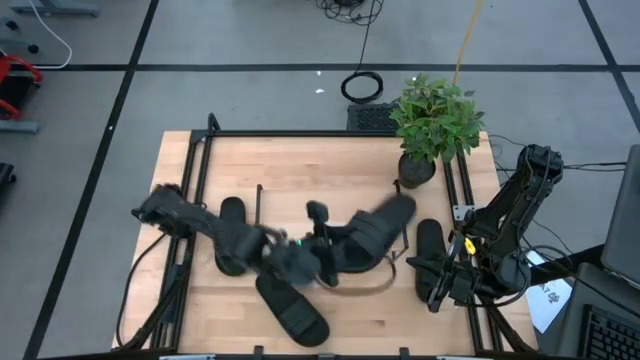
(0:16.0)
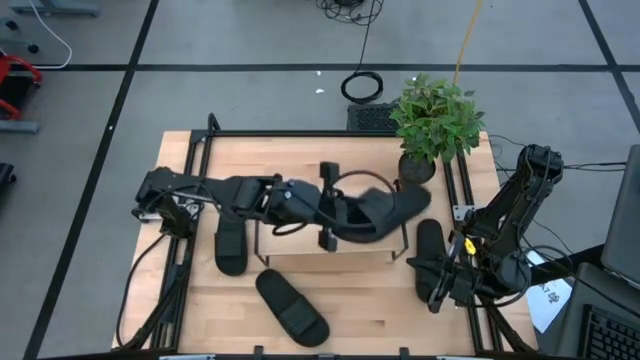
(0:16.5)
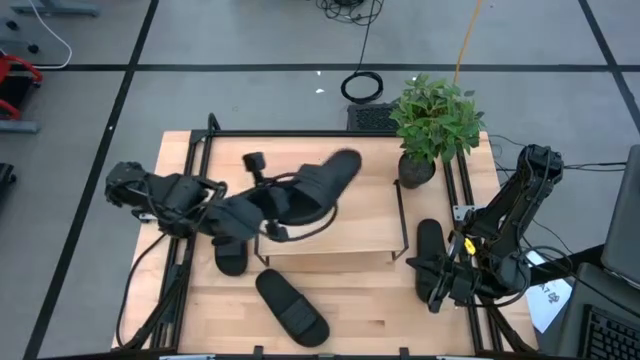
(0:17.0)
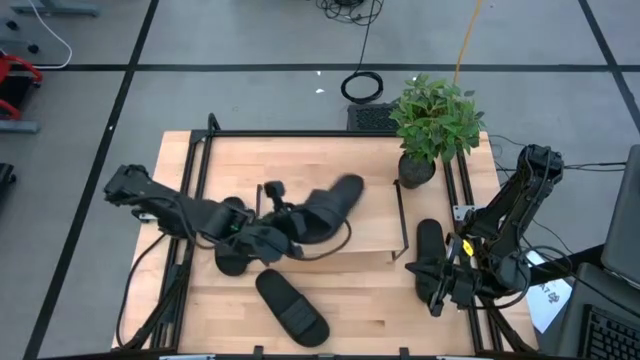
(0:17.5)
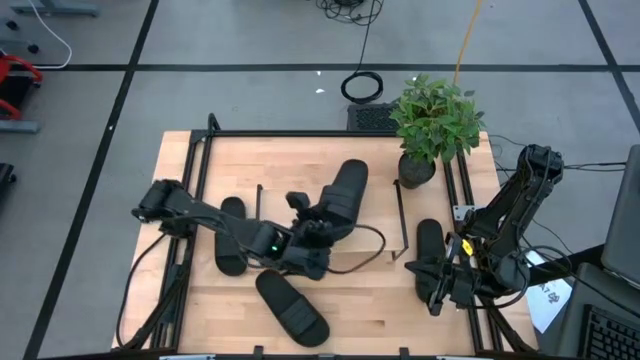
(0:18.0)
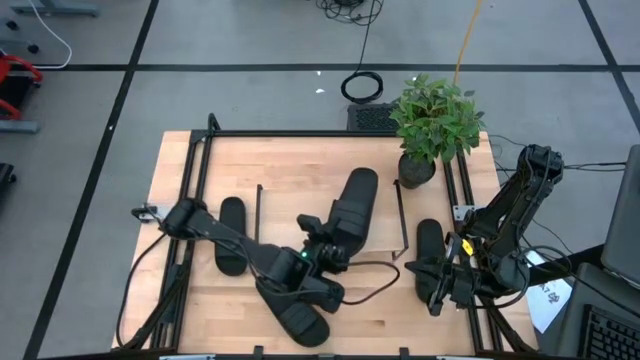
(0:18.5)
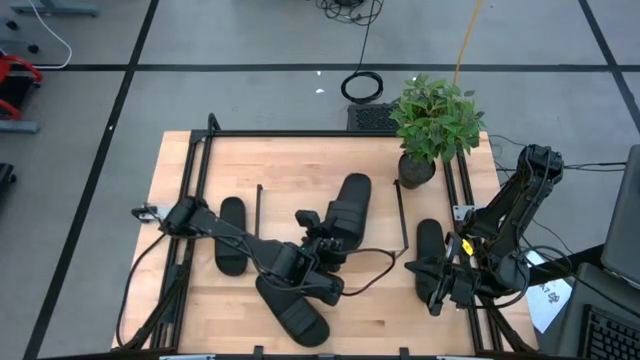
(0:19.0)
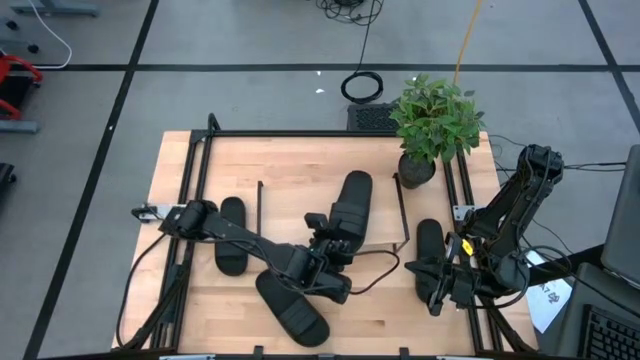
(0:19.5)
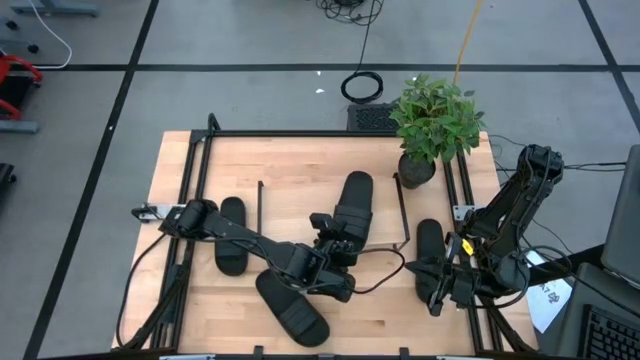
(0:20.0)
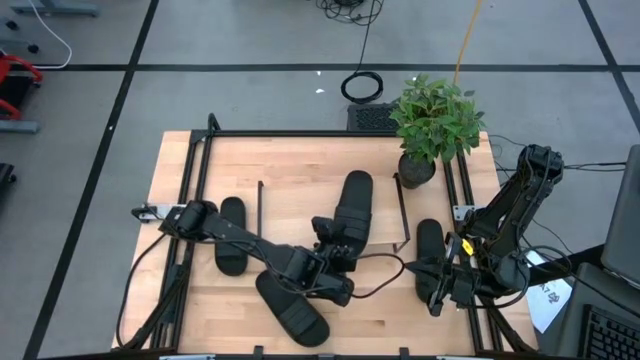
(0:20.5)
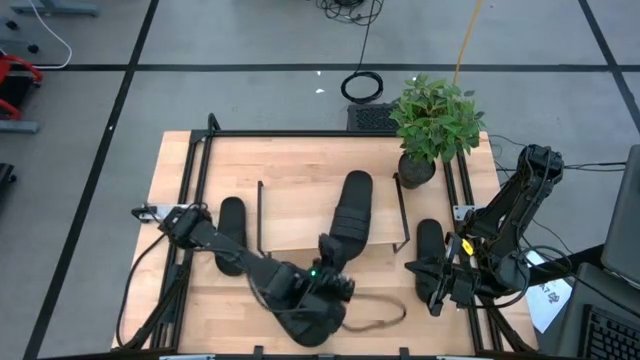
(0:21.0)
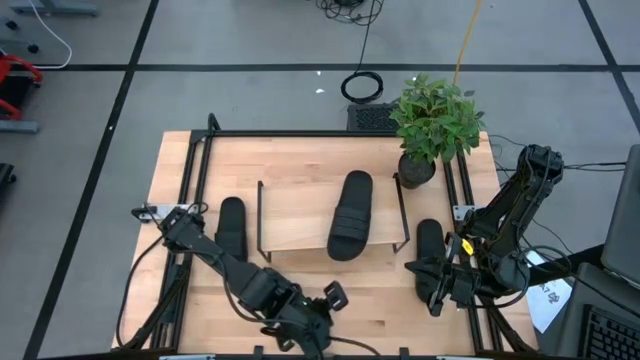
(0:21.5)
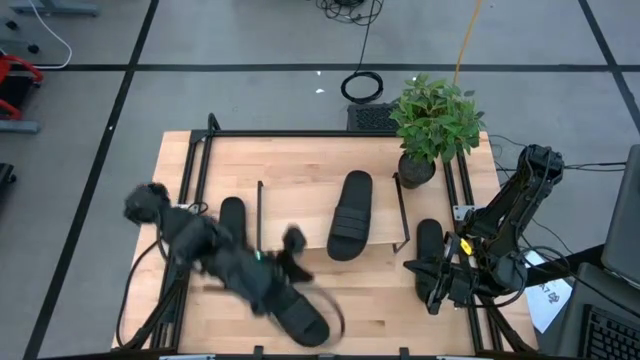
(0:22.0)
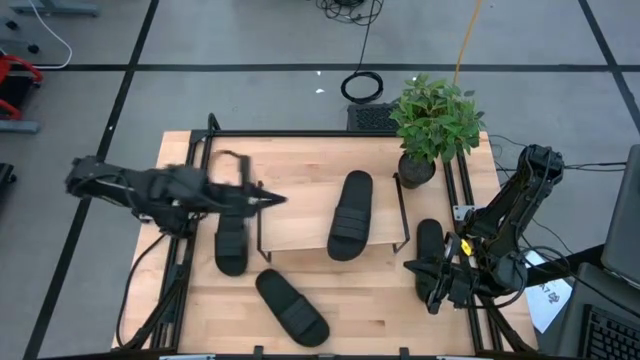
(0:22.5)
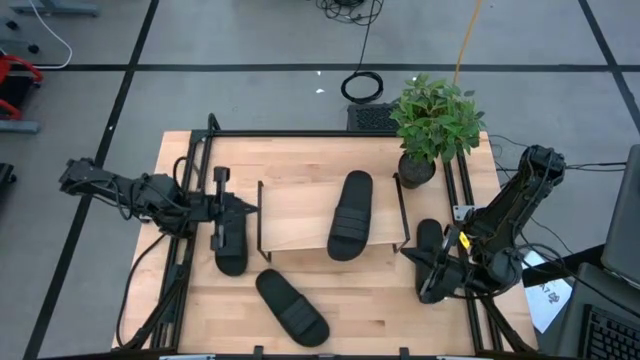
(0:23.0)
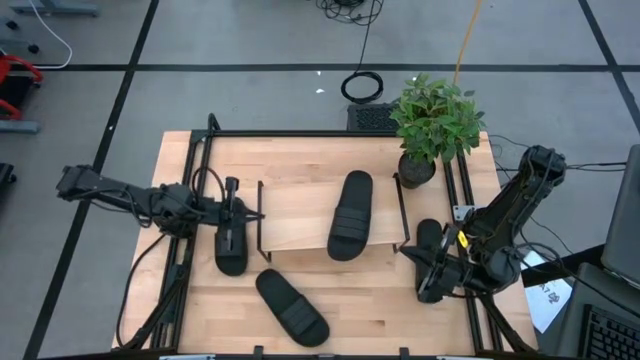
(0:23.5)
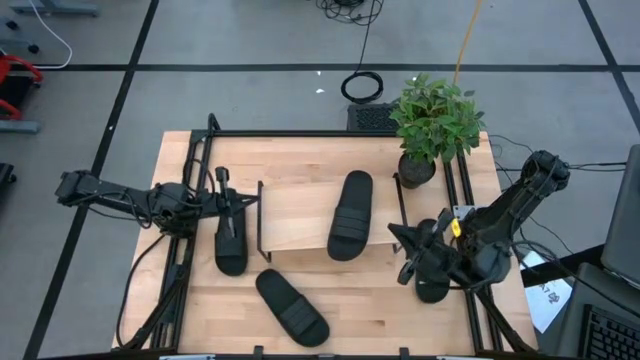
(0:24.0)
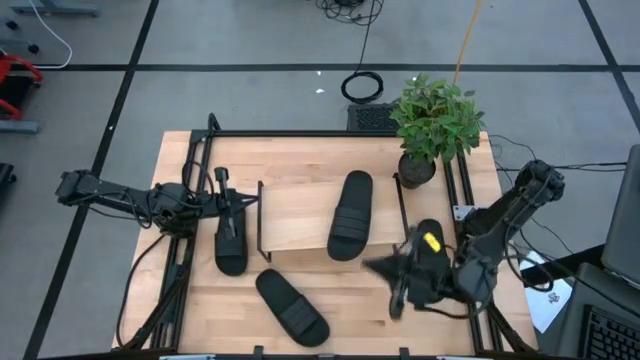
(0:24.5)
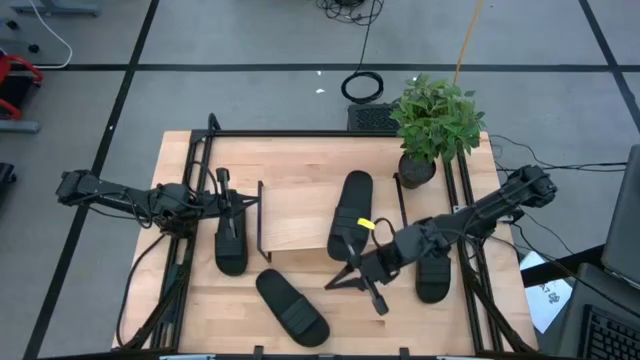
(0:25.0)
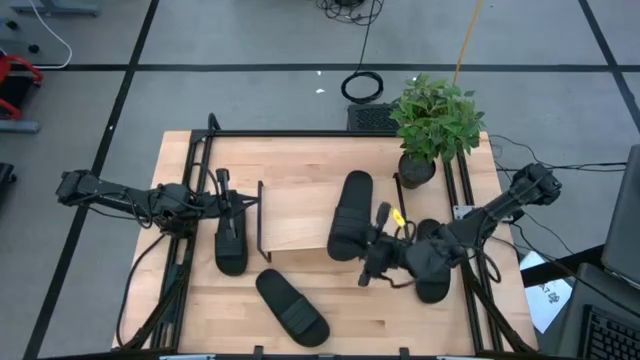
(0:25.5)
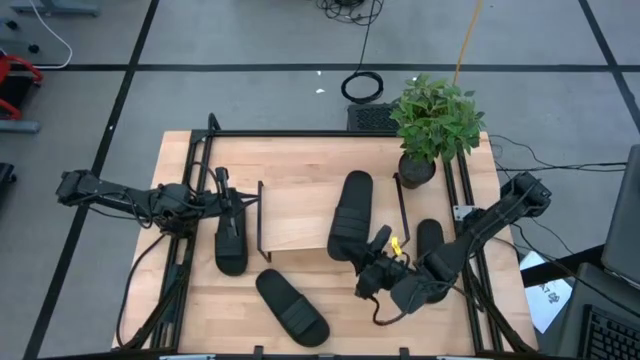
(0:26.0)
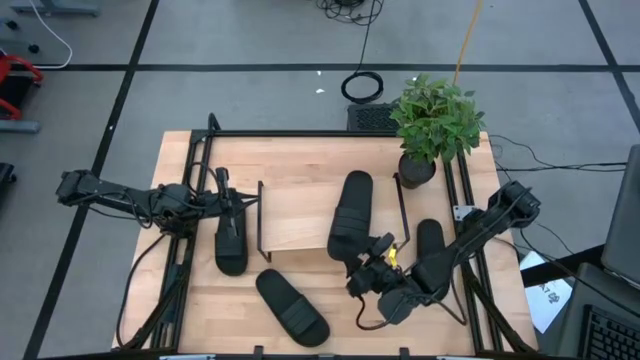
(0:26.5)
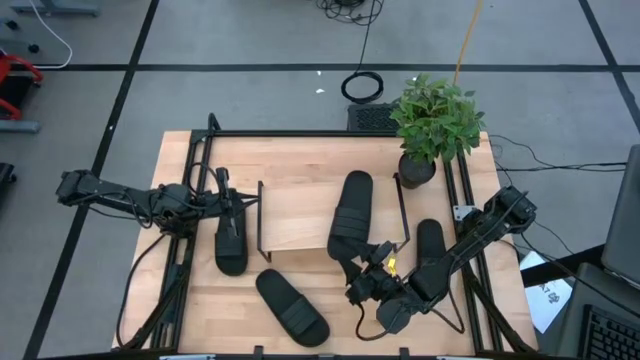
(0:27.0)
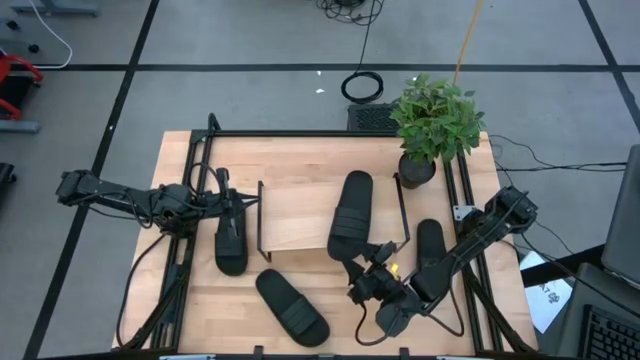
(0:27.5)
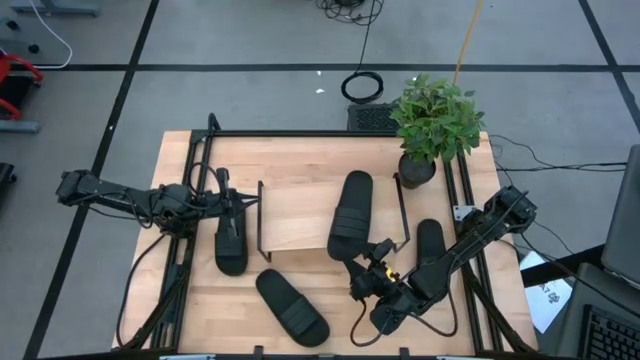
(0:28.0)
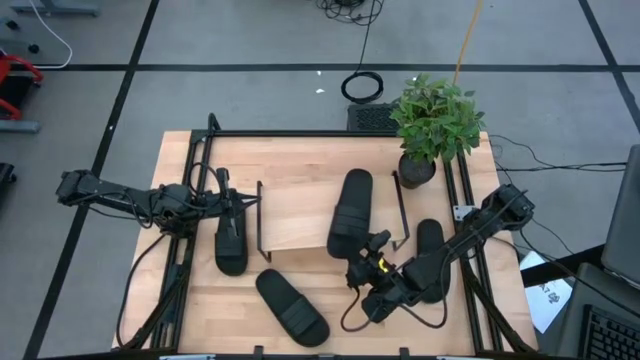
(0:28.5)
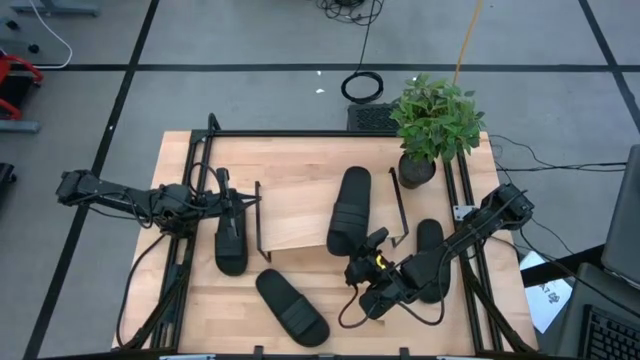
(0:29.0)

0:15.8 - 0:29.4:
Task: Pick and place slides into the shelf
Put the bottom left black slide on the shelf

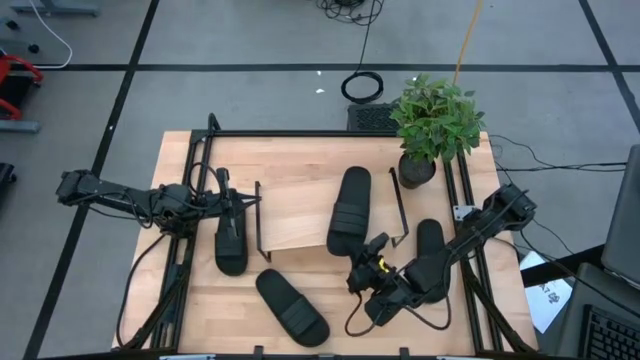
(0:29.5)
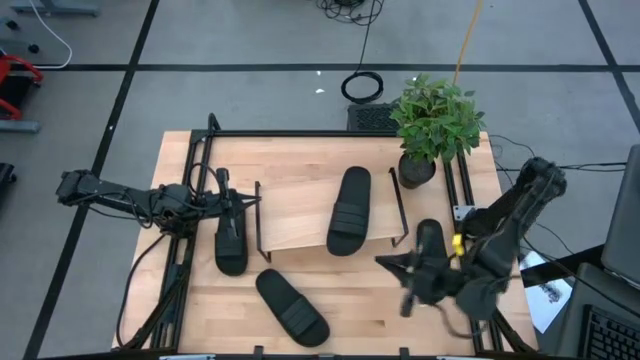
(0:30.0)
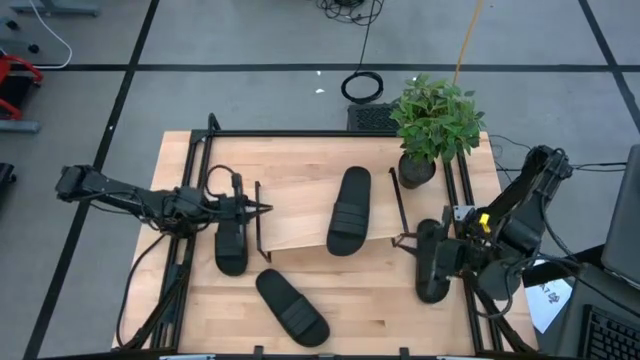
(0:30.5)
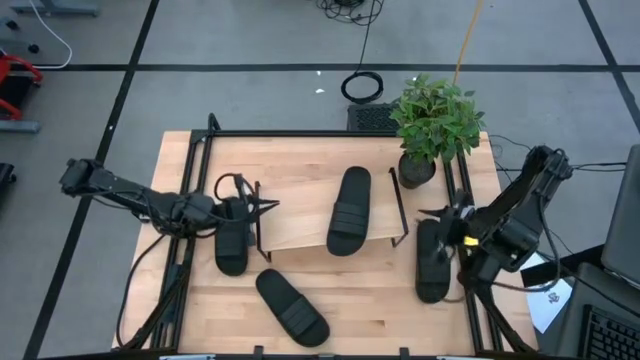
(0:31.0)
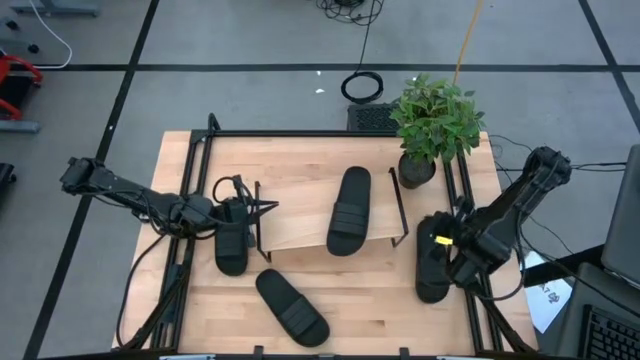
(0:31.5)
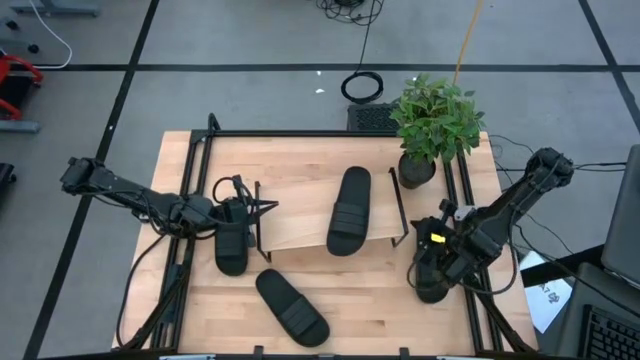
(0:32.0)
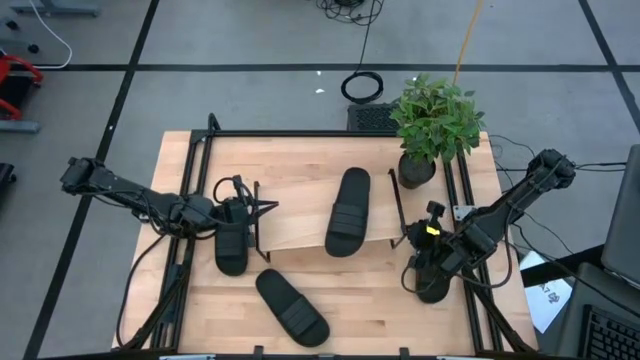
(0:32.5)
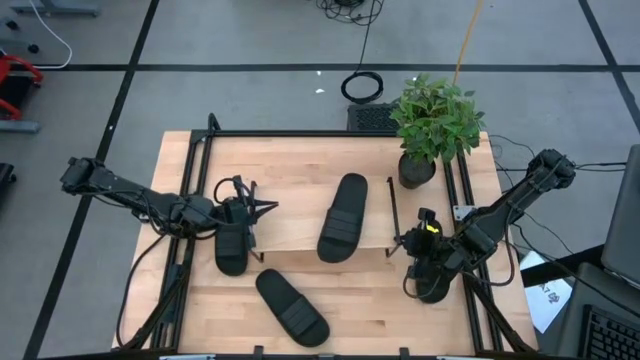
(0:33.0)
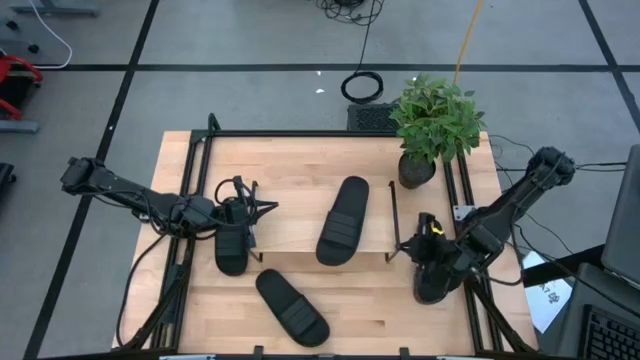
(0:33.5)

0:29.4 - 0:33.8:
Adjust the shelf

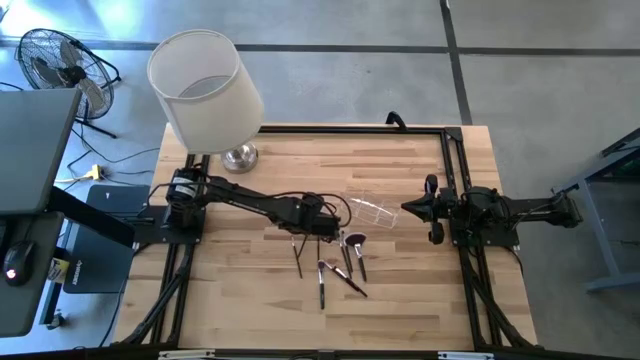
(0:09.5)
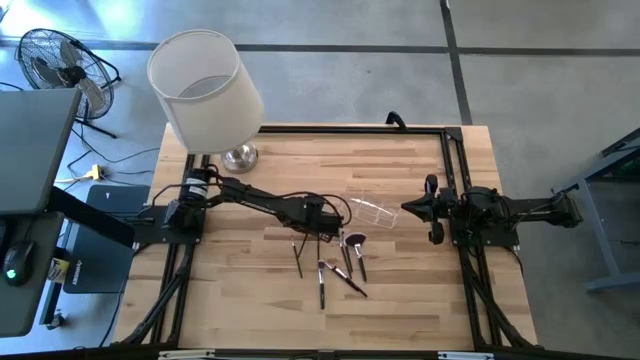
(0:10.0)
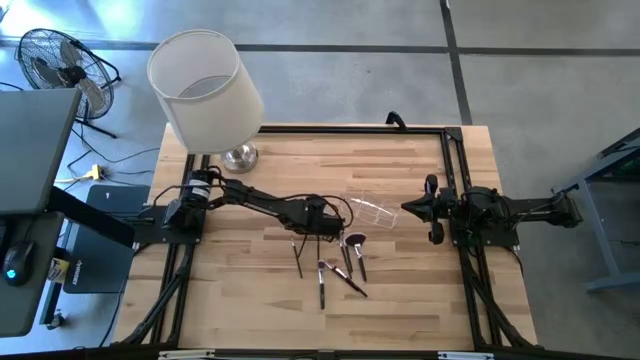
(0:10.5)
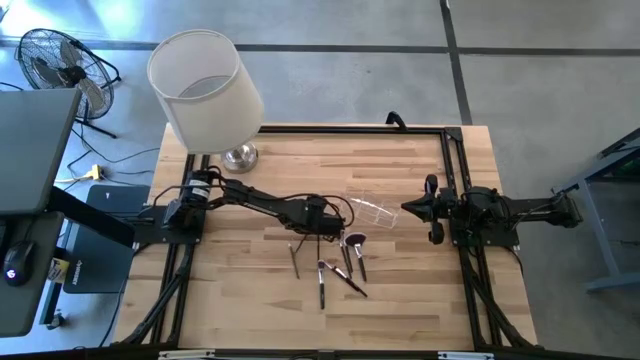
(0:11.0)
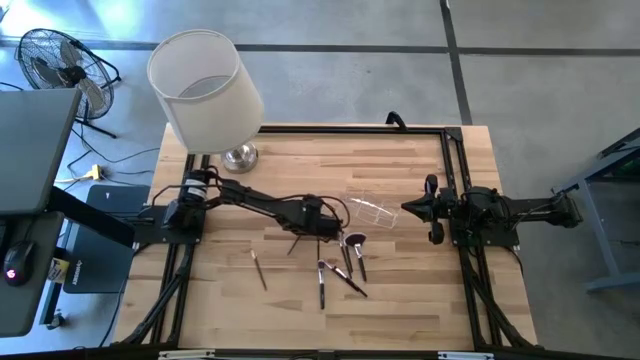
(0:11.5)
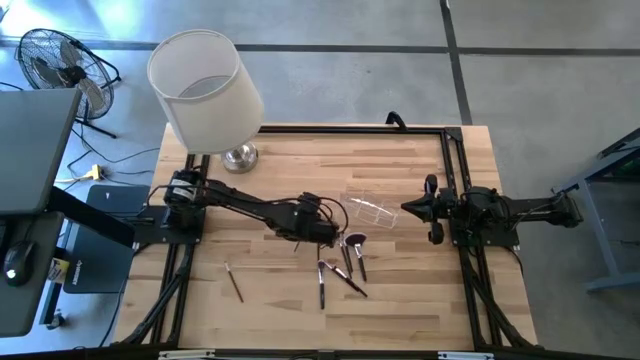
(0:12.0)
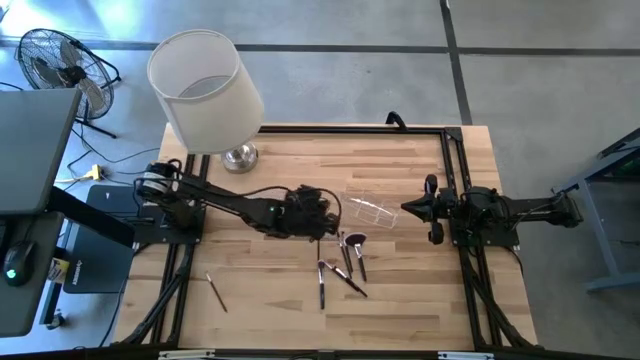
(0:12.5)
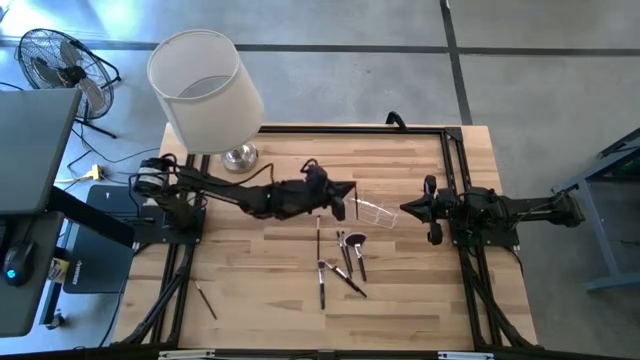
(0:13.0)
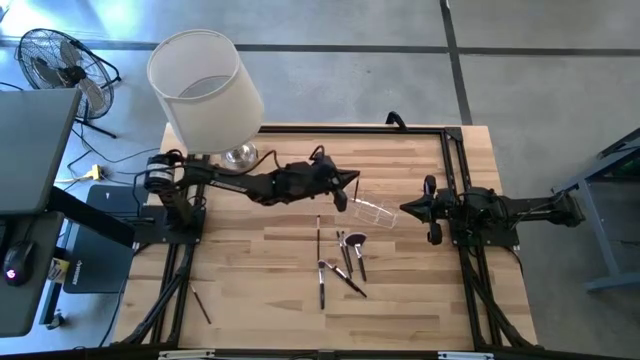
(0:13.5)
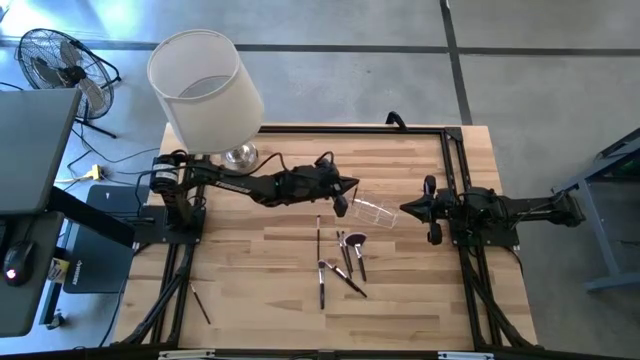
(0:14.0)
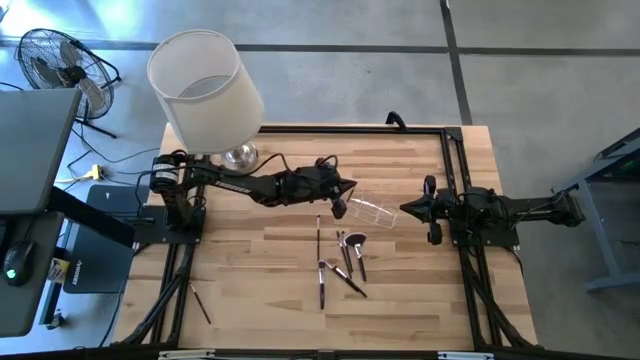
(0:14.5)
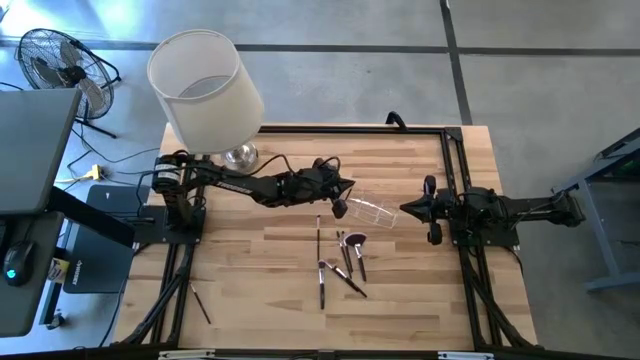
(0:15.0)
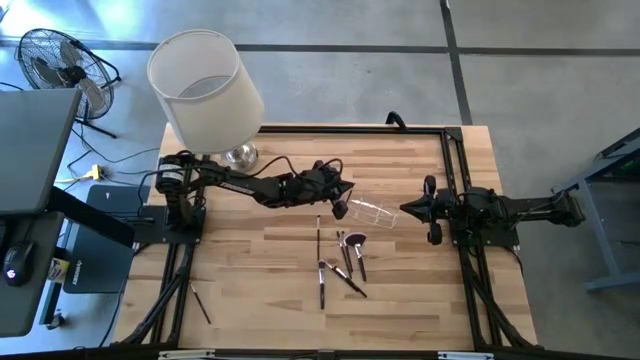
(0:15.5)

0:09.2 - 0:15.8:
Task: Put items in baskets/containers
Put the black eyeshadow brush into the transparent organizer
